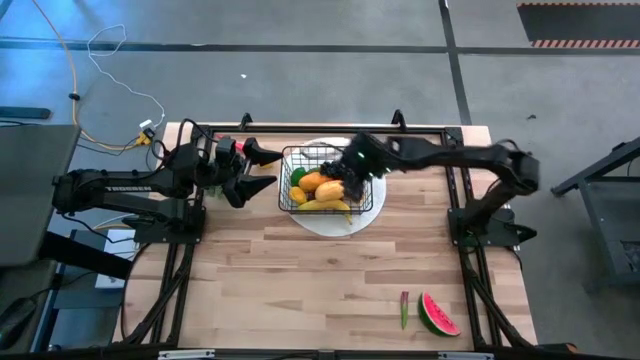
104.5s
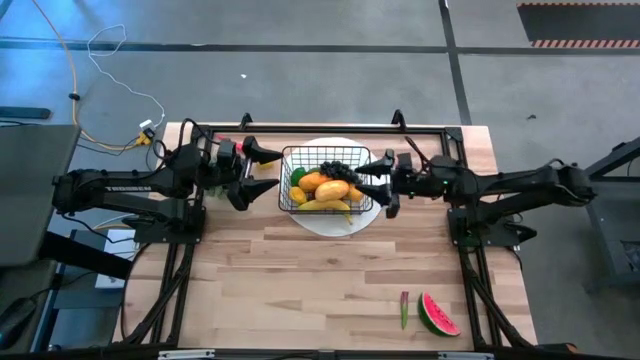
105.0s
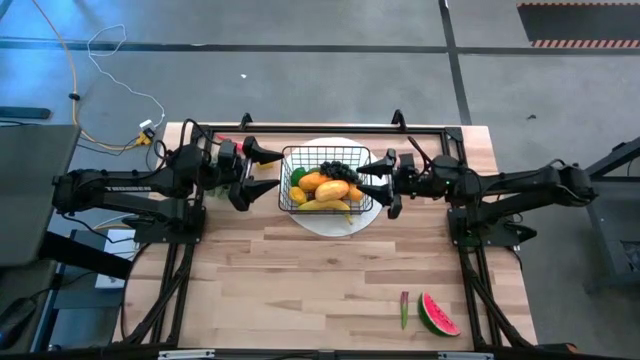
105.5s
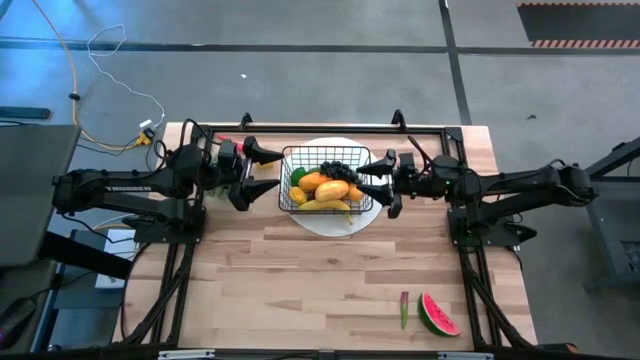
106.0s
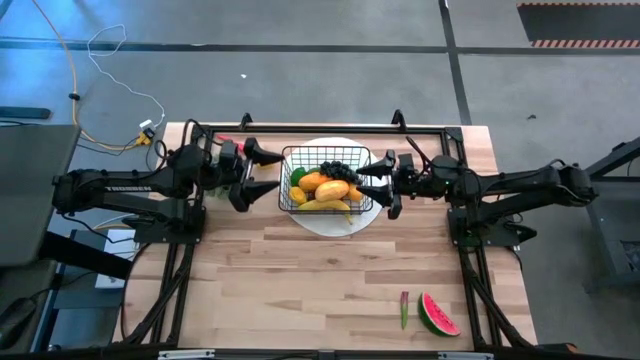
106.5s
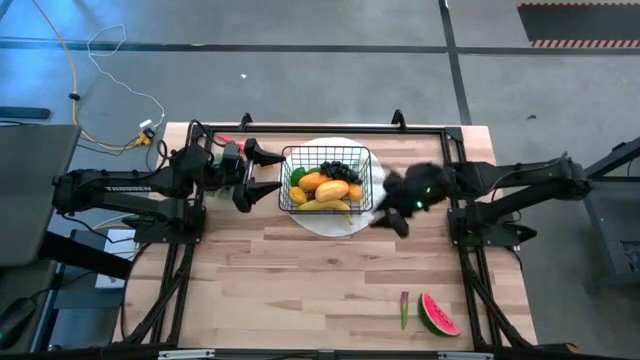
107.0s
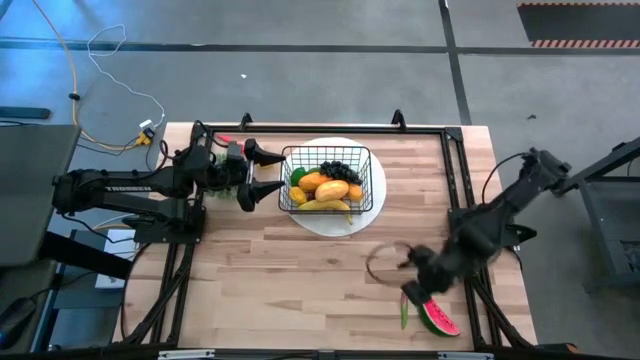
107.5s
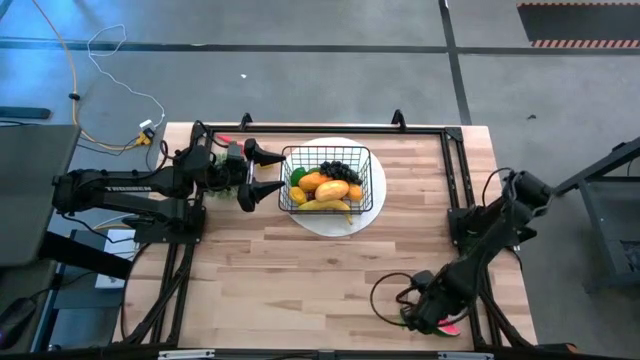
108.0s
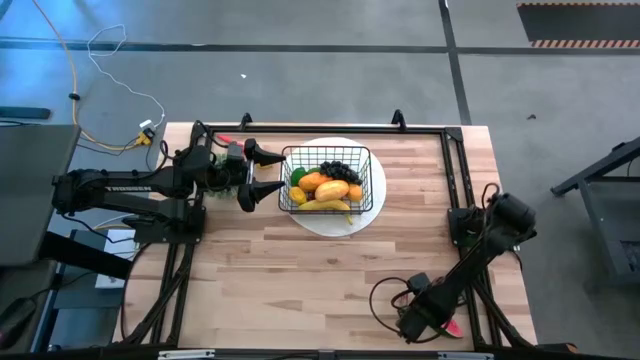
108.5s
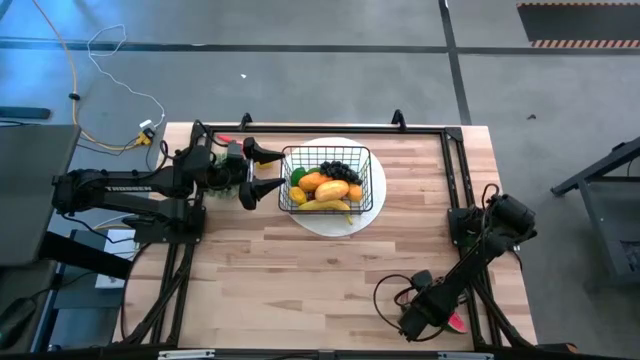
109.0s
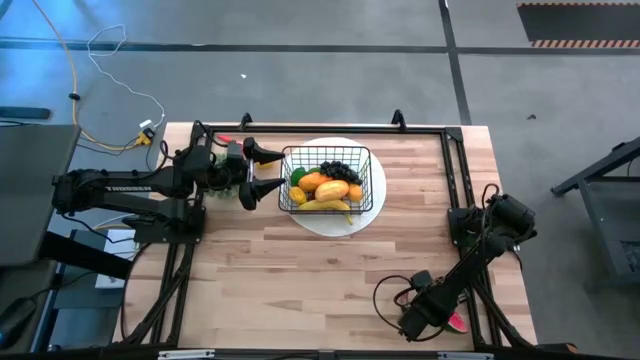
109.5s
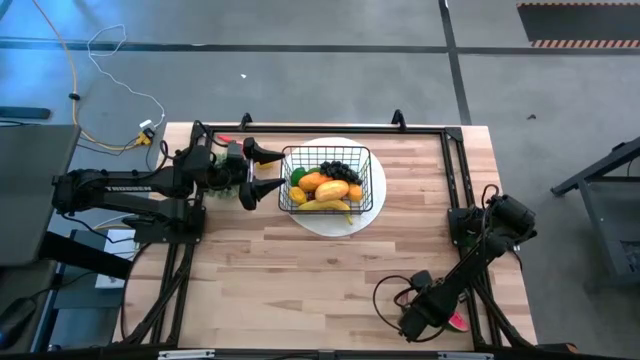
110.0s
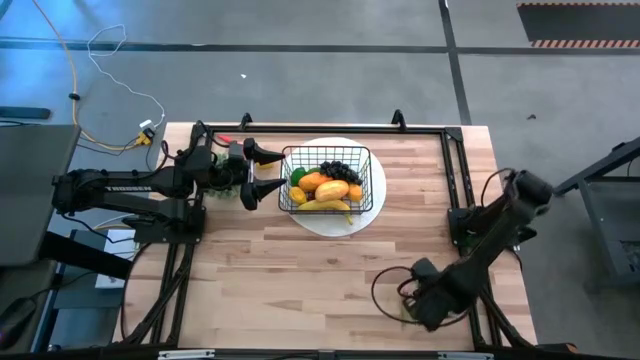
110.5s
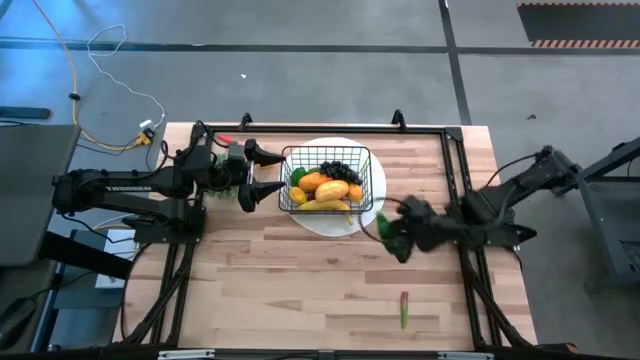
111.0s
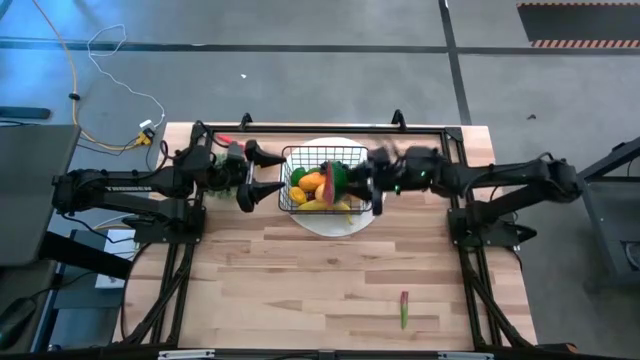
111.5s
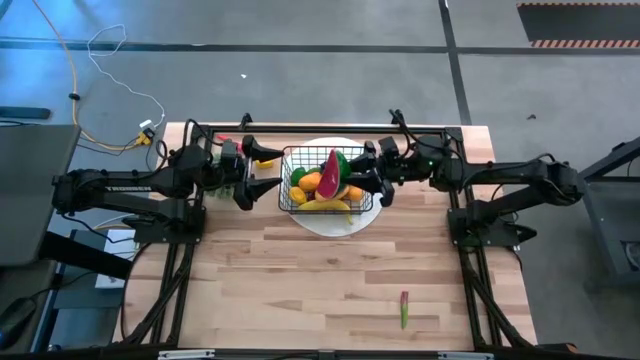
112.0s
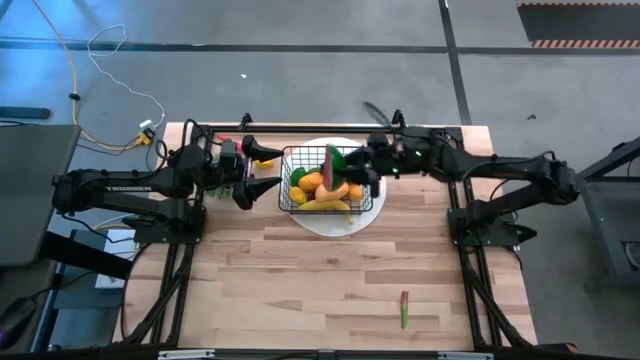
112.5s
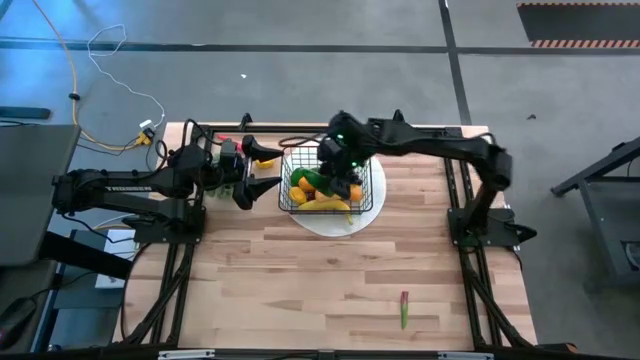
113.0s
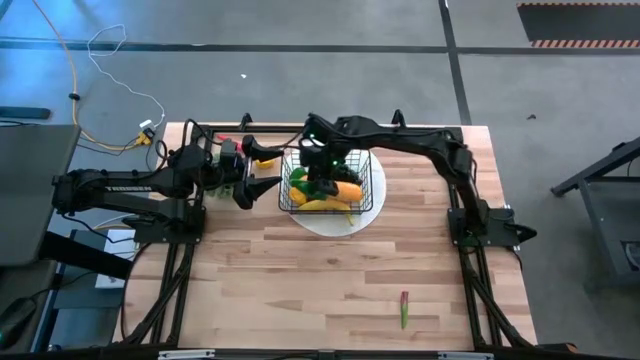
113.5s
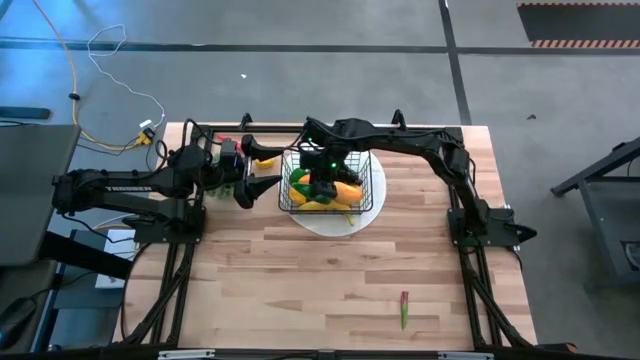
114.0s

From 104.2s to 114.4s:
Task: Build produce basket
Put the red watermelon into the wire basket

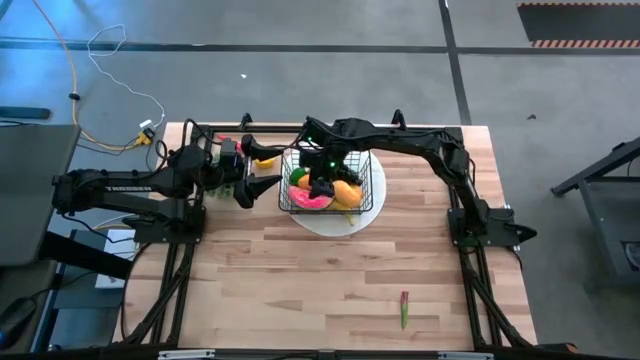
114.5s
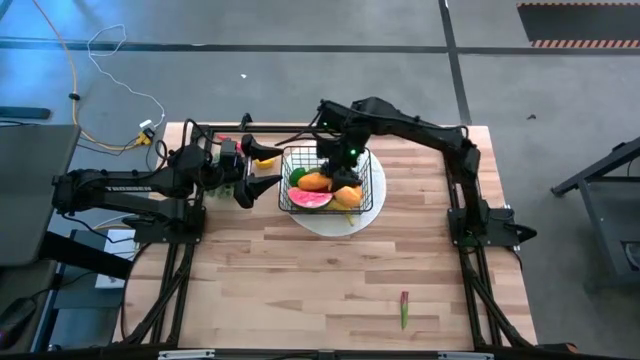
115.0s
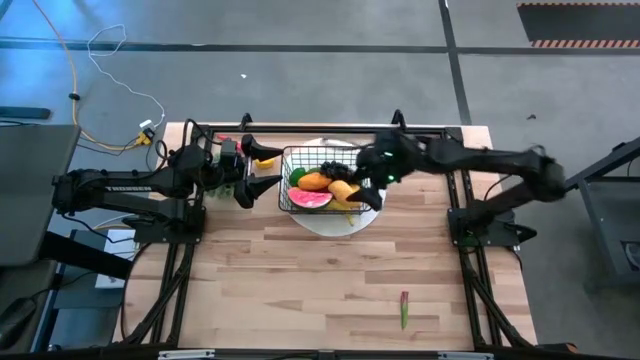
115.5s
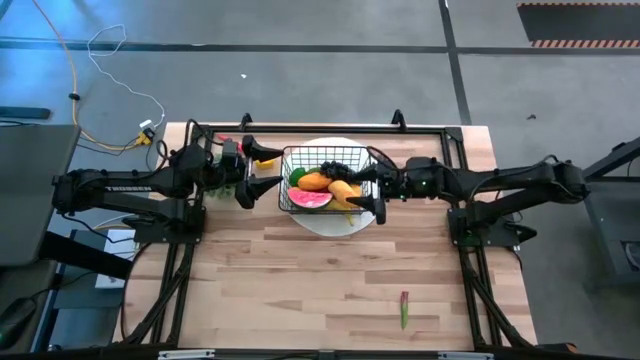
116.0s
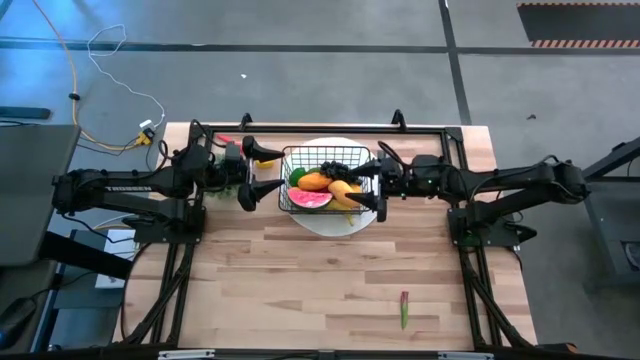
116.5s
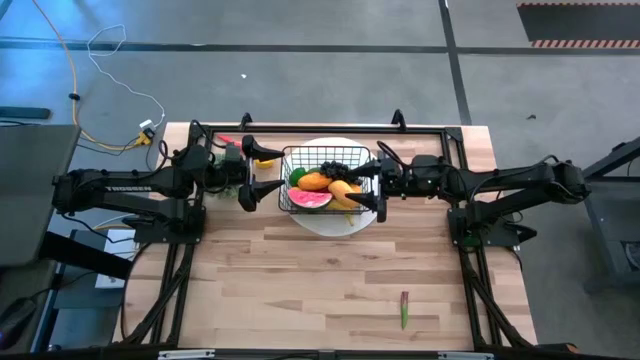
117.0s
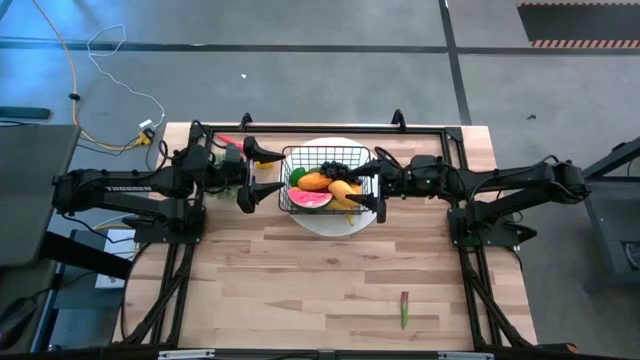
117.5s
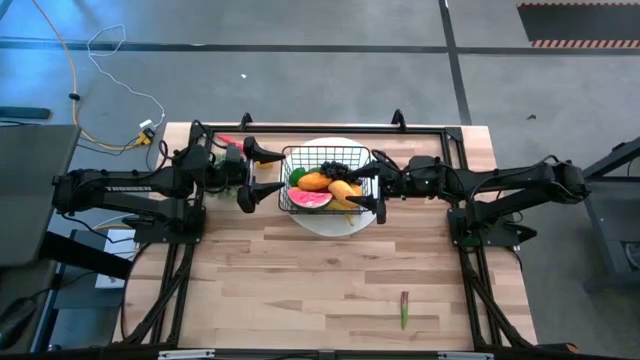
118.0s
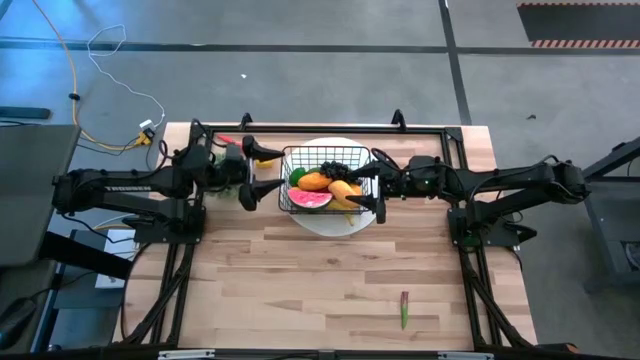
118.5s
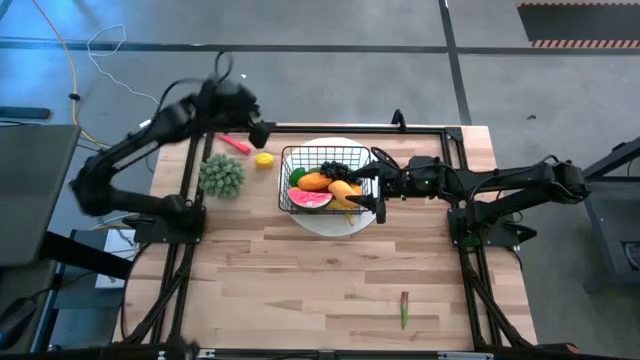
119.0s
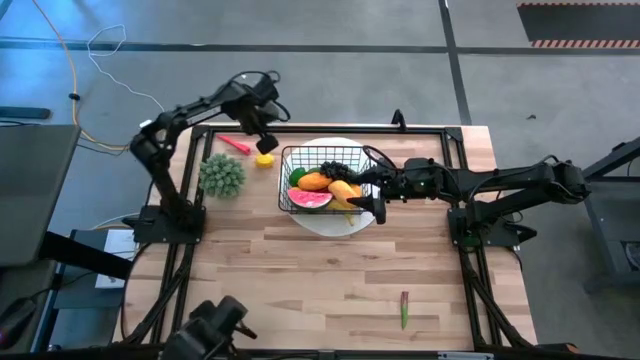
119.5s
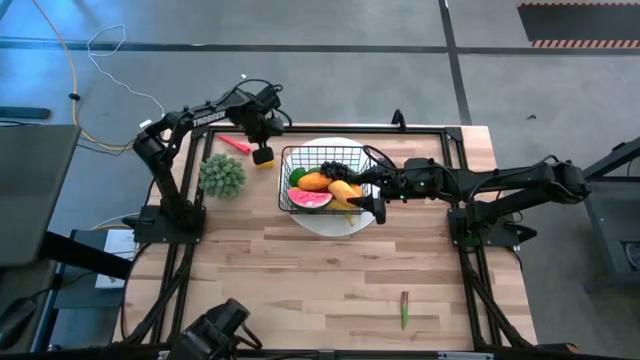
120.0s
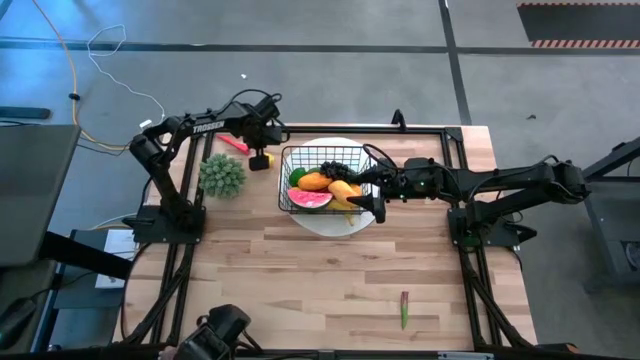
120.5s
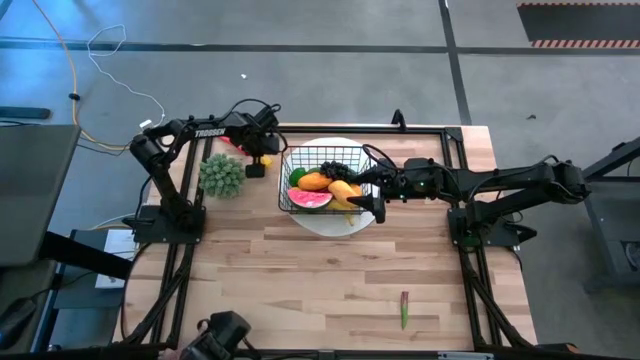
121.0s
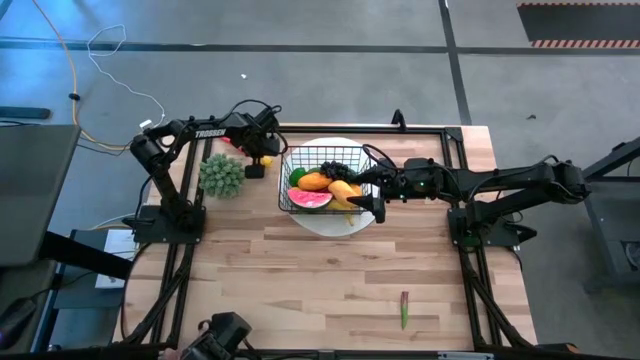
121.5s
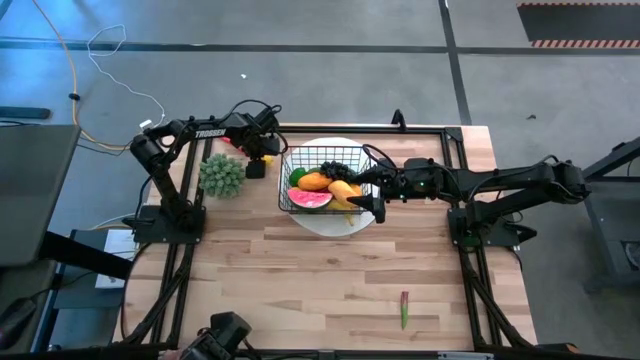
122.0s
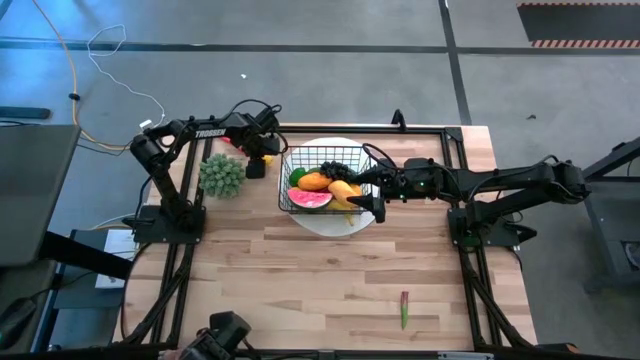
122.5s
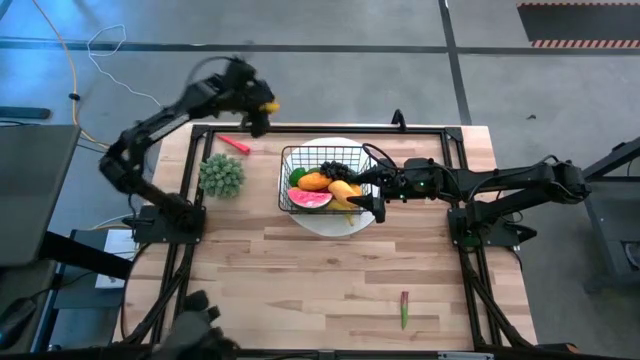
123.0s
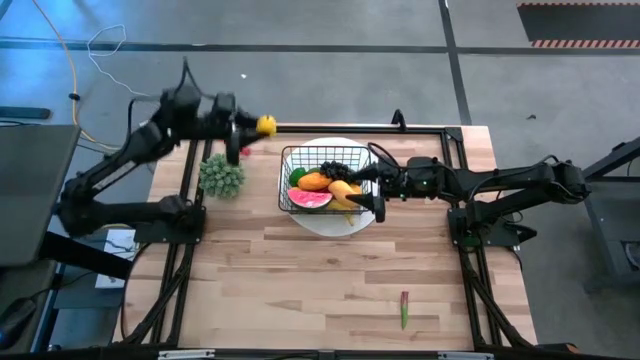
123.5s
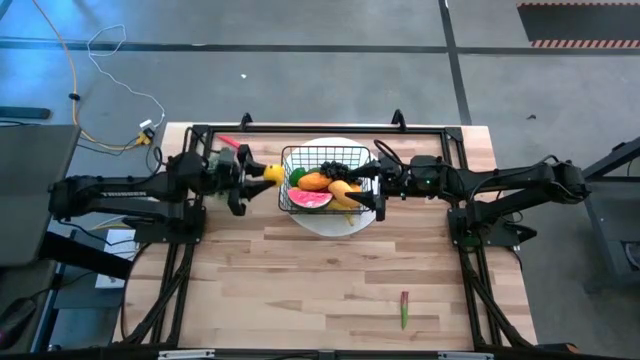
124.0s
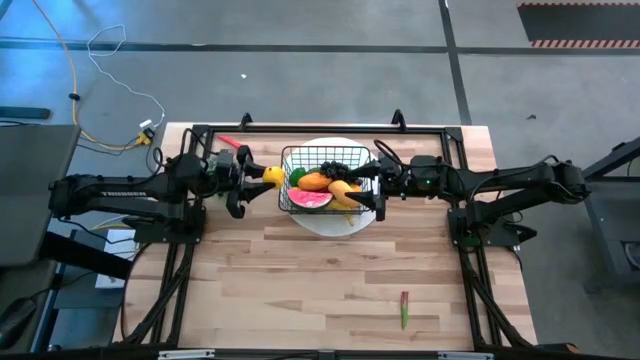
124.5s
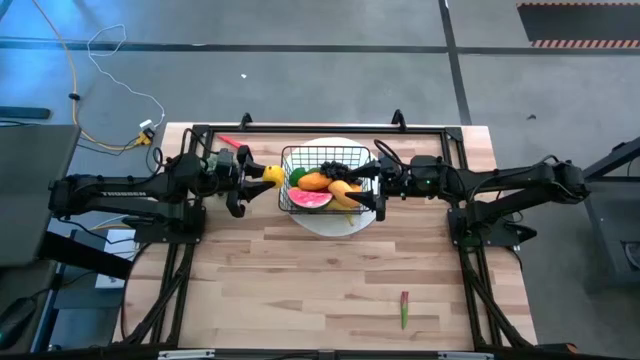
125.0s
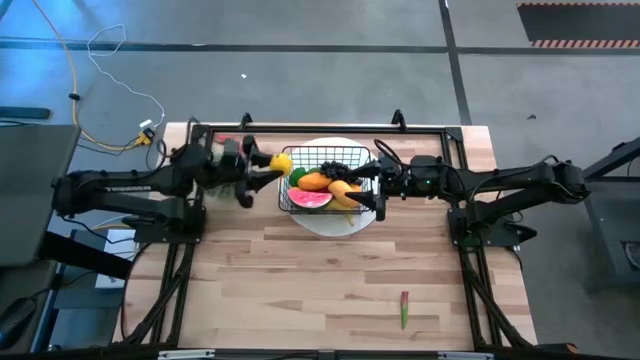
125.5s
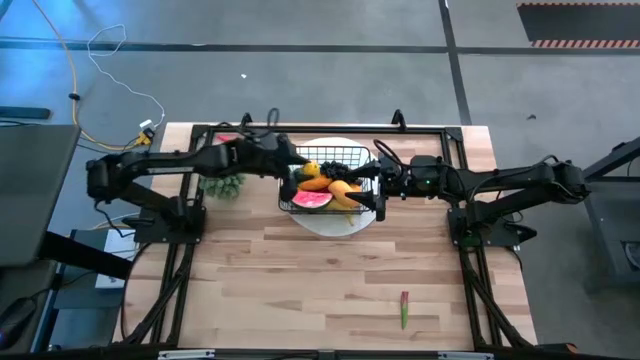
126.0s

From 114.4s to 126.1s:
Put the yellow lemon into the wire basket
